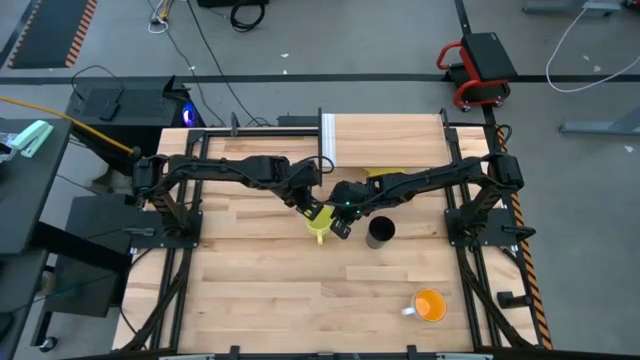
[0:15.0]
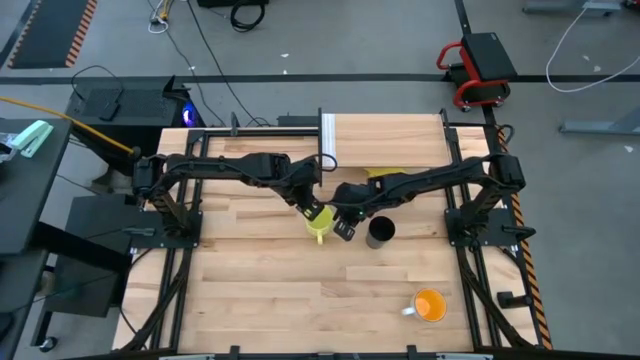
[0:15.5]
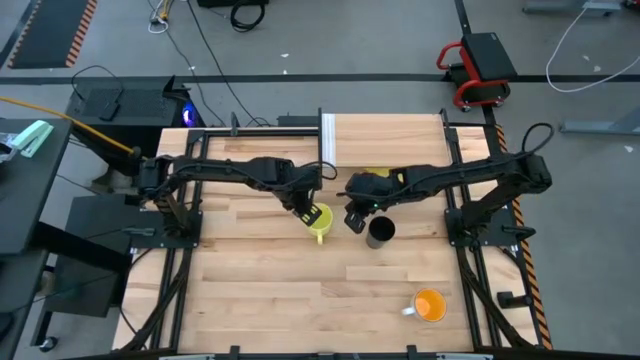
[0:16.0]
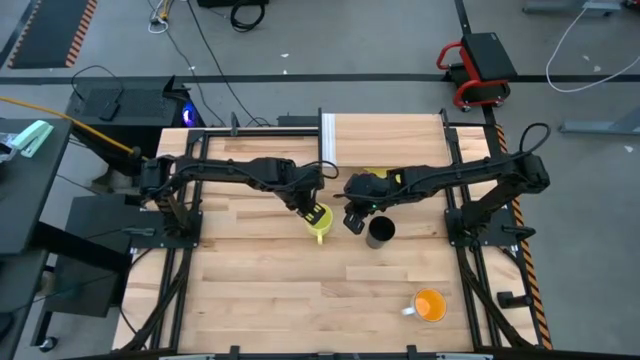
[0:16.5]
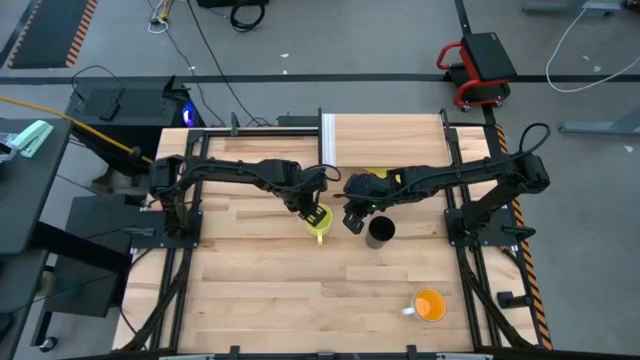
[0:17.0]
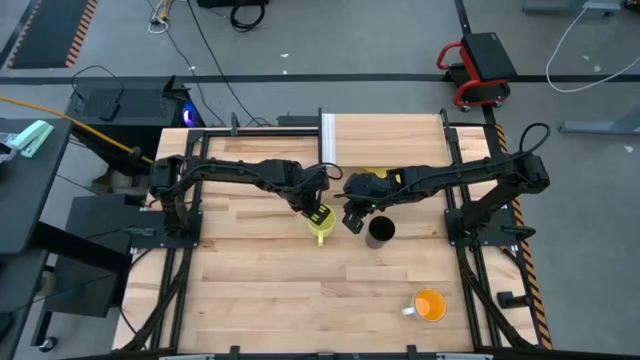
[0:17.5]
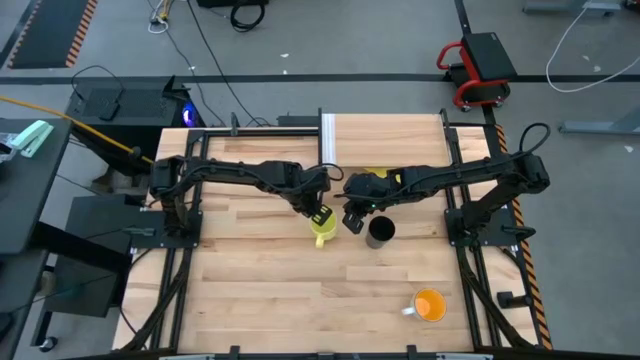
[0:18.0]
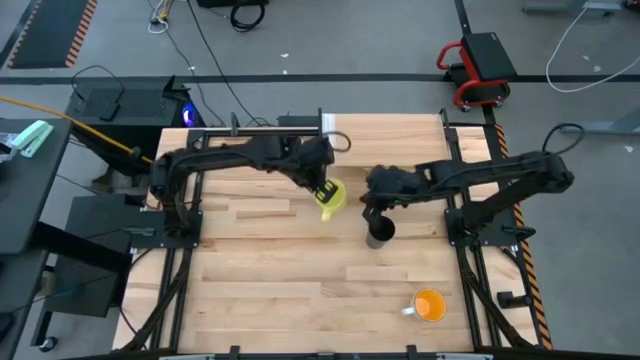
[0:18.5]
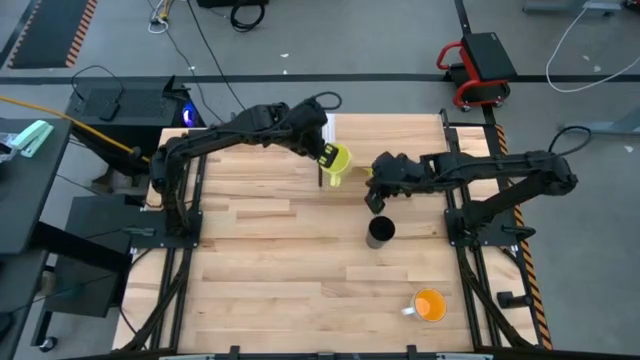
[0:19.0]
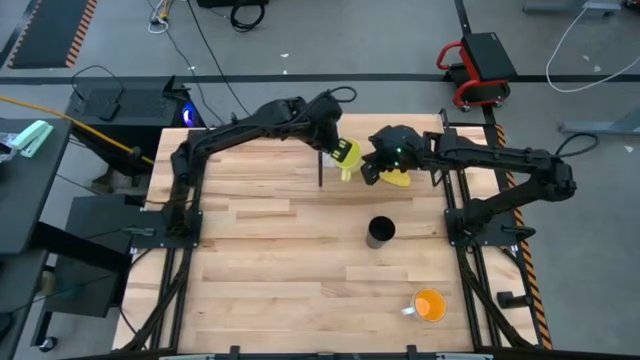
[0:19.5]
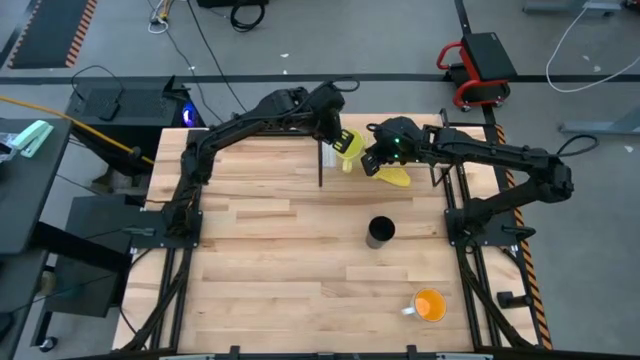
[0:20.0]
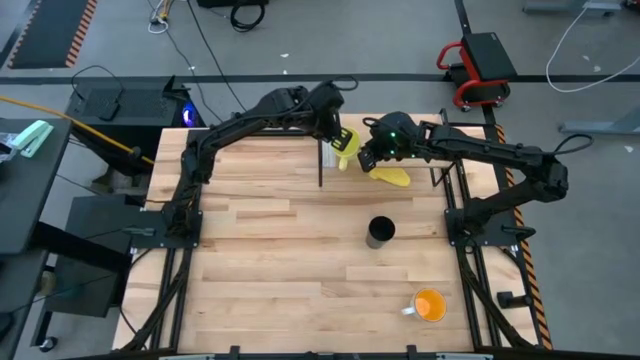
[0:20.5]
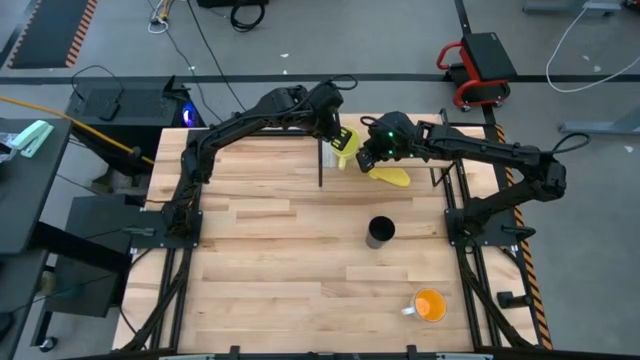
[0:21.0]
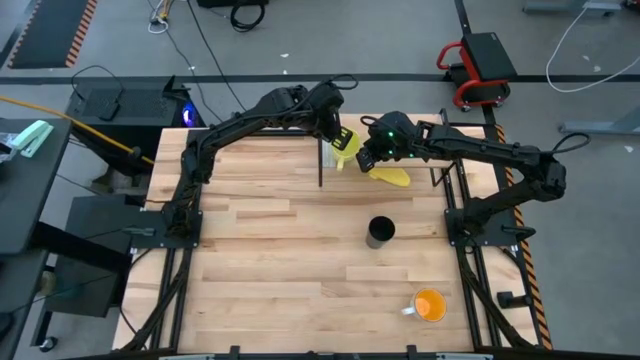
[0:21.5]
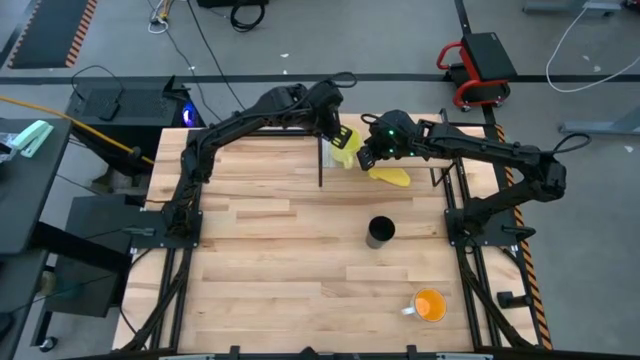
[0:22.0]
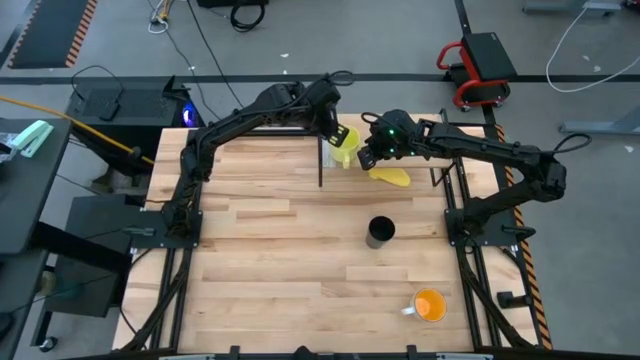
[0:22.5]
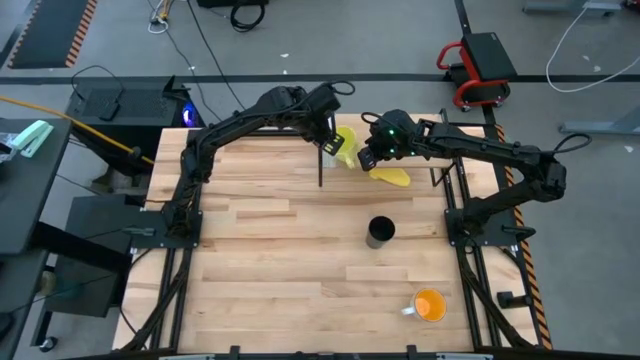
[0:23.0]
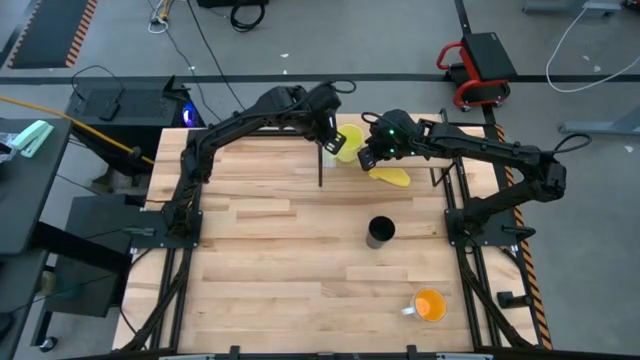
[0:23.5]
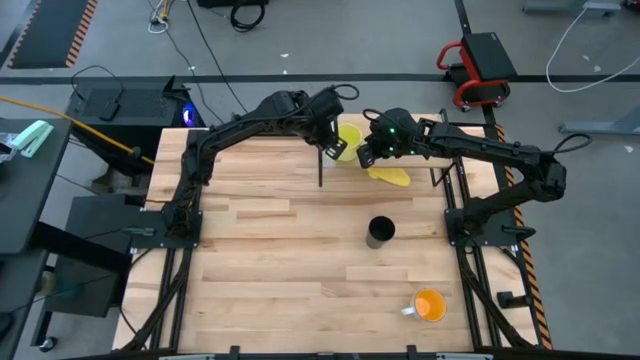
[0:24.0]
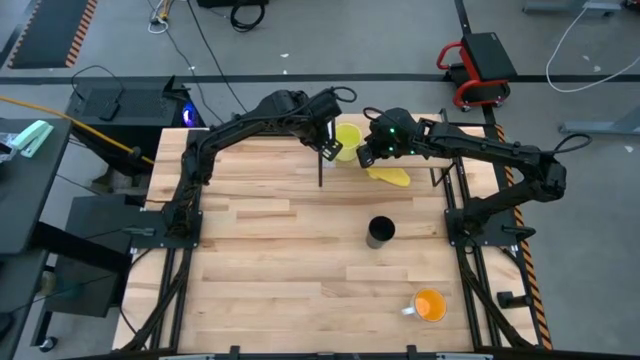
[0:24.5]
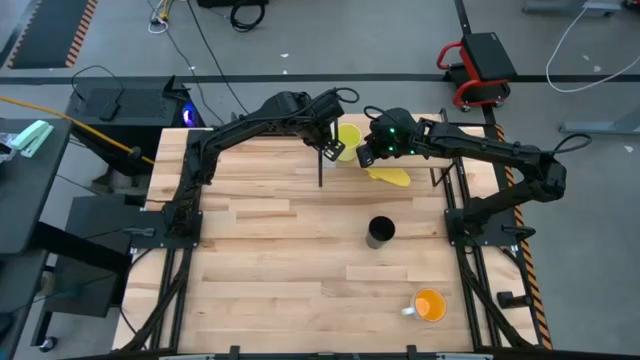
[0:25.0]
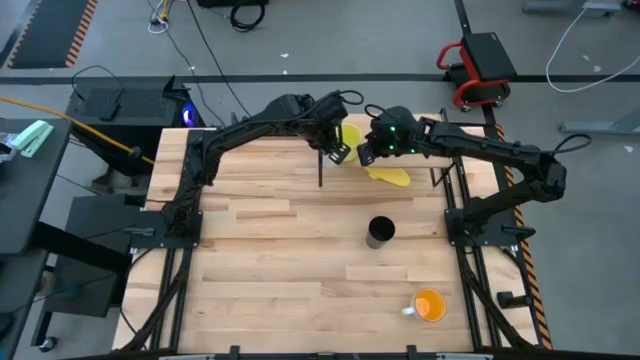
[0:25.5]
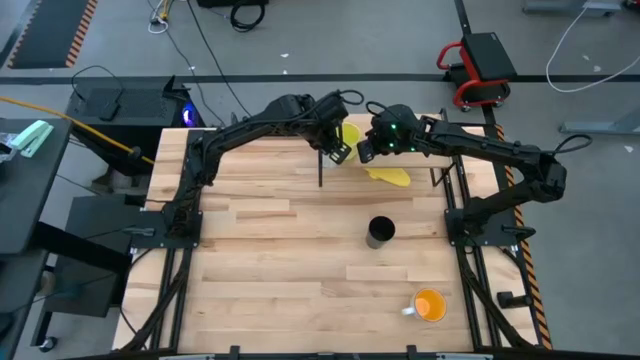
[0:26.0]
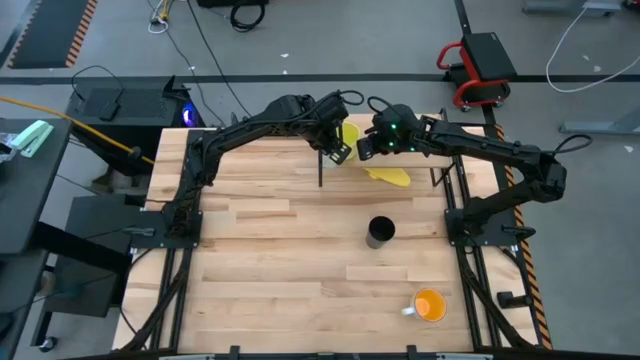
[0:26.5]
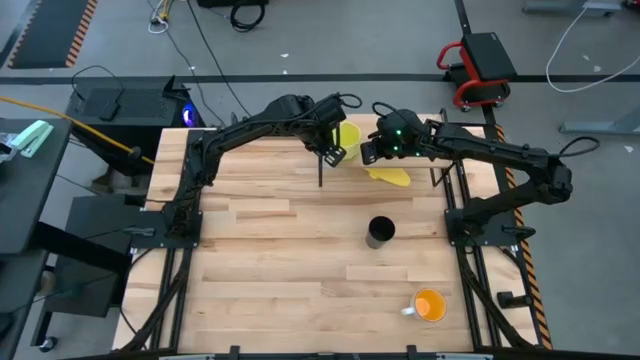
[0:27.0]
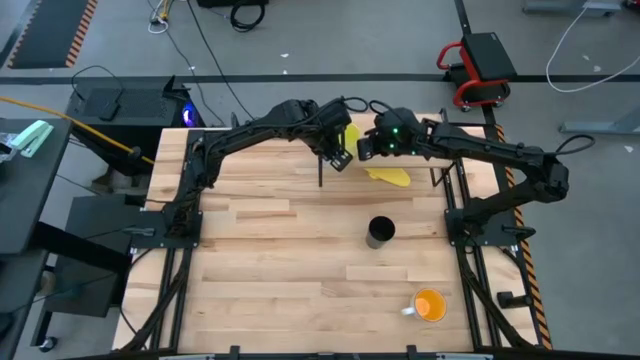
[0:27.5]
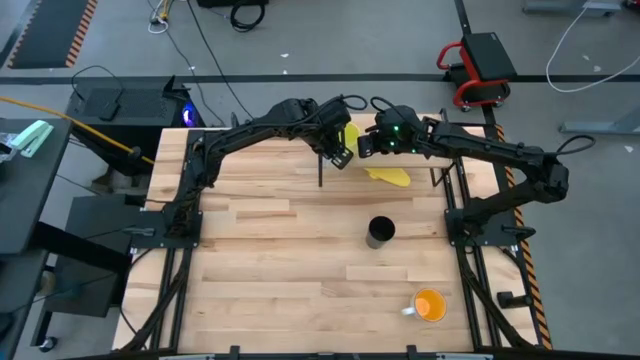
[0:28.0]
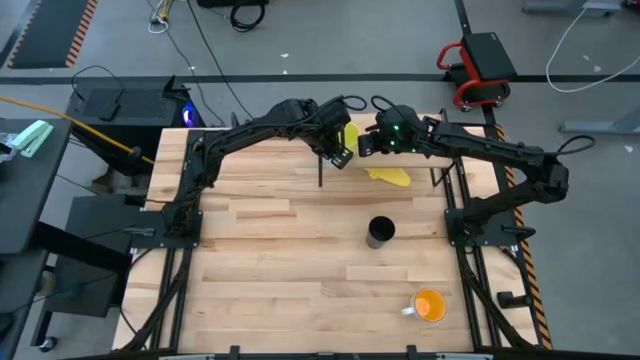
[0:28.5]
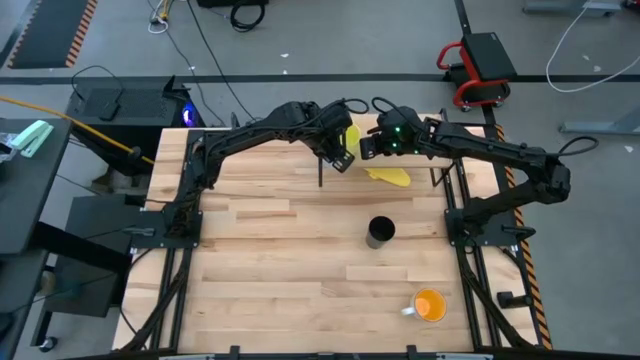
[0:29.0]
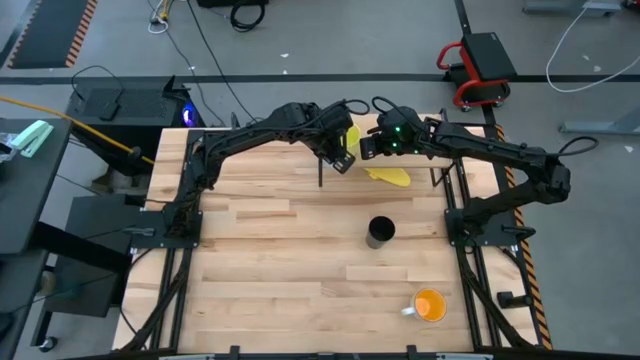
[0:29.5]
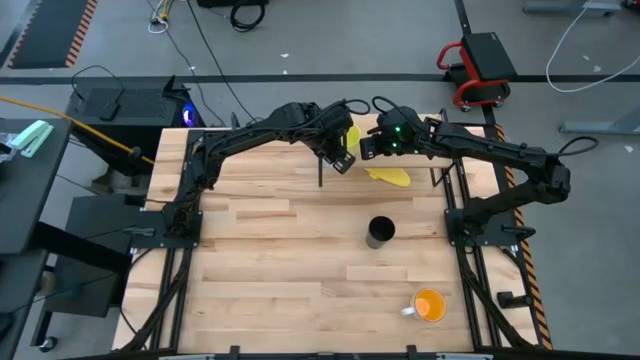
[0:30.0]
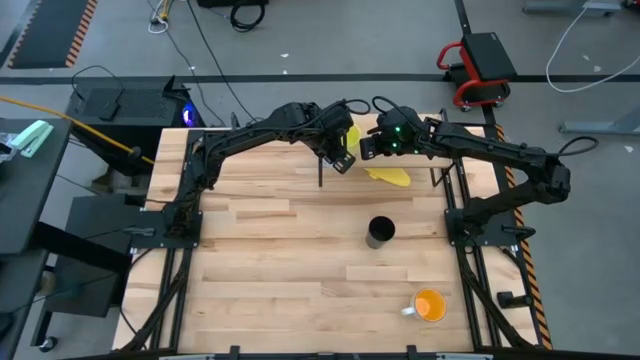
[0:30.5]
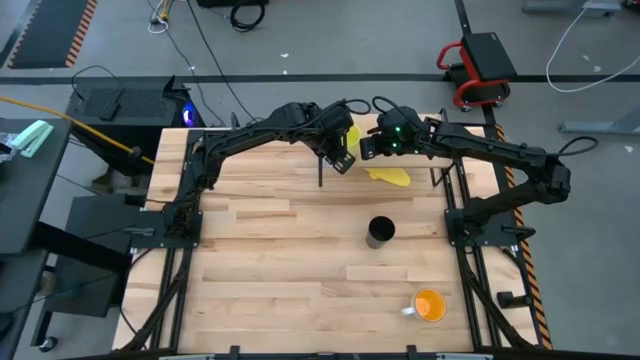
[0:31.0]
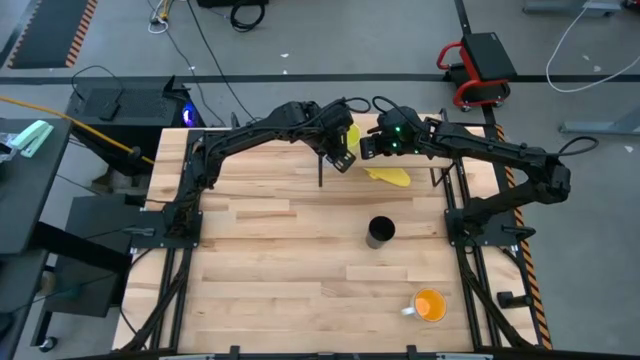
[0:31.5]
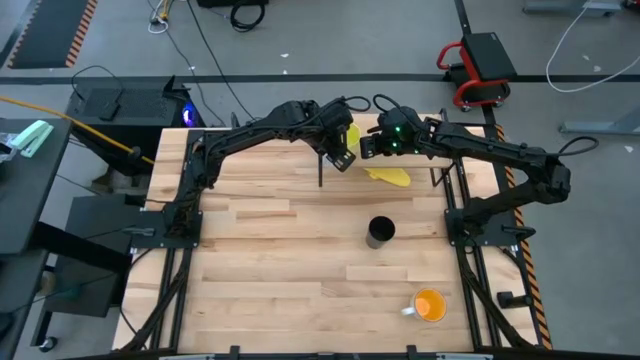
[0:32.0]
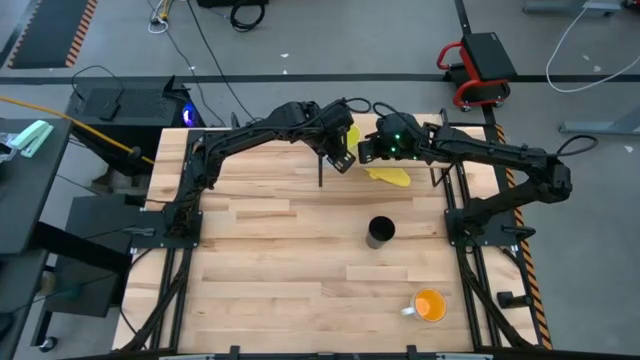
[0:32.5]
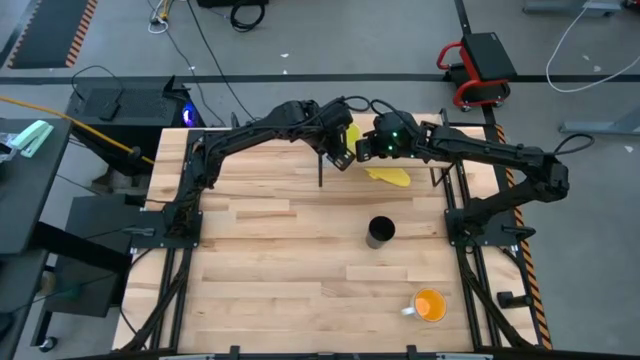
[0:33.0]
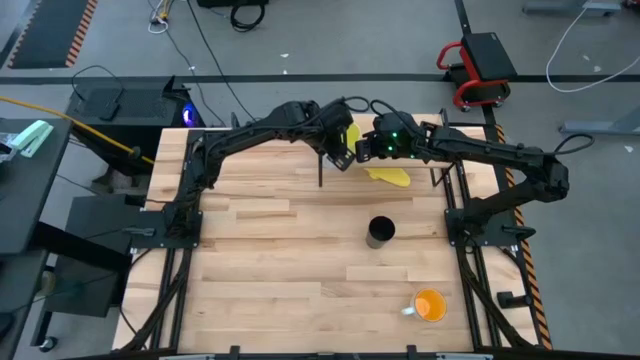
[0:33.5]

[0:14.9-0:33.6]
Task: Stack small to large cups/mugs on shelf
Put the yellow mug on the shelf

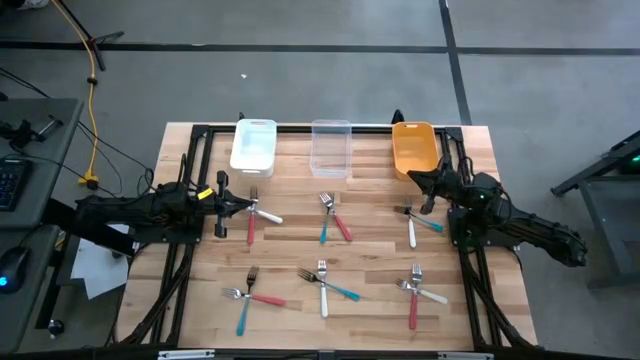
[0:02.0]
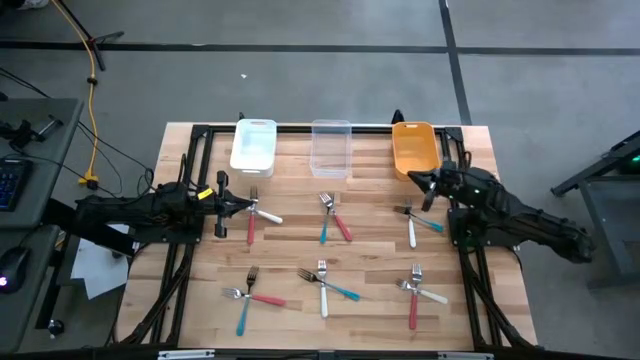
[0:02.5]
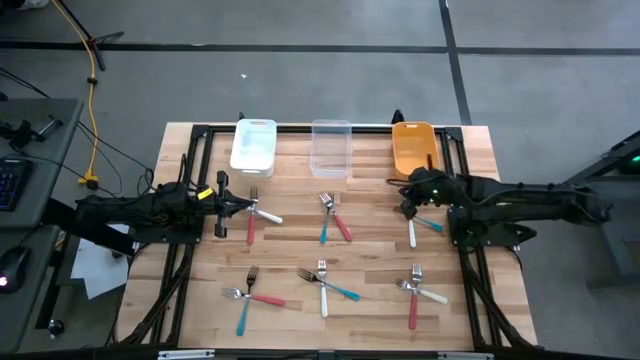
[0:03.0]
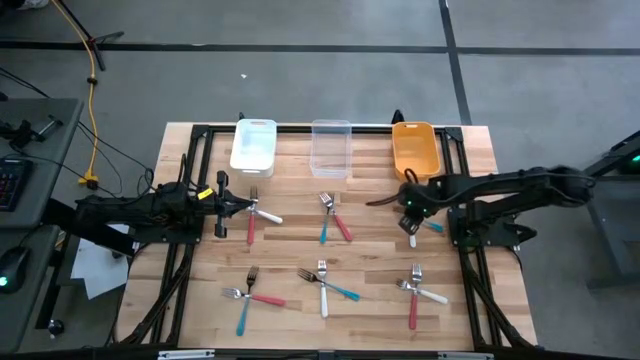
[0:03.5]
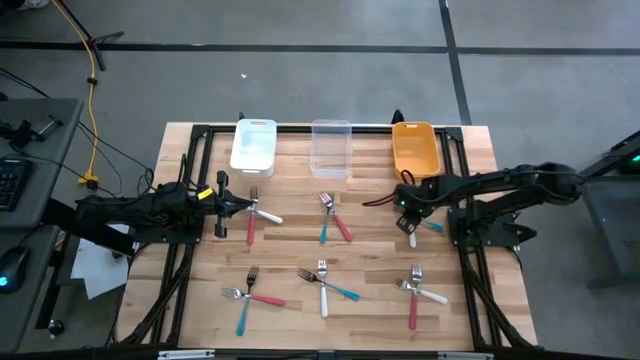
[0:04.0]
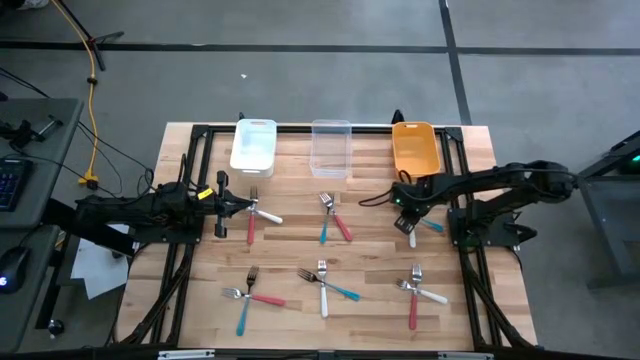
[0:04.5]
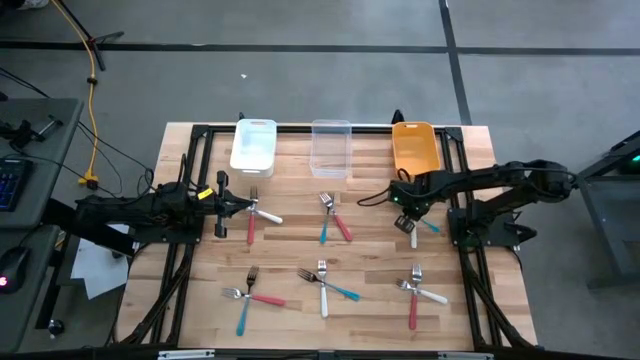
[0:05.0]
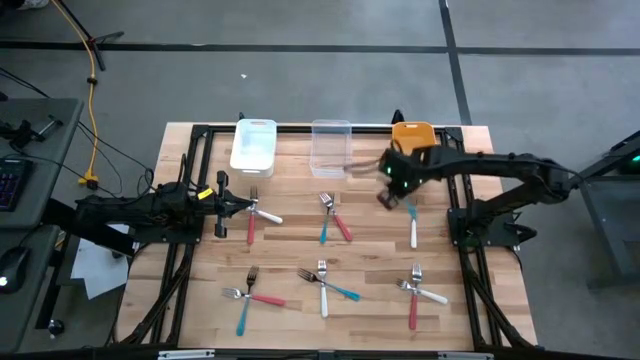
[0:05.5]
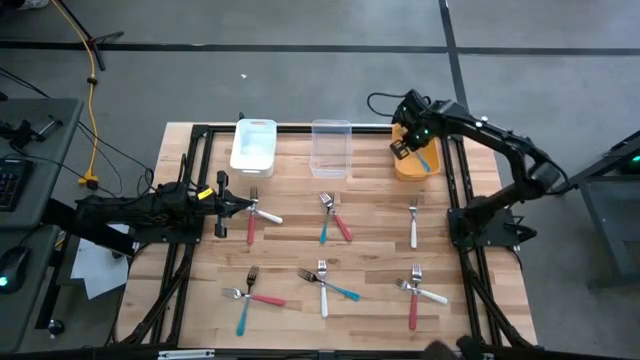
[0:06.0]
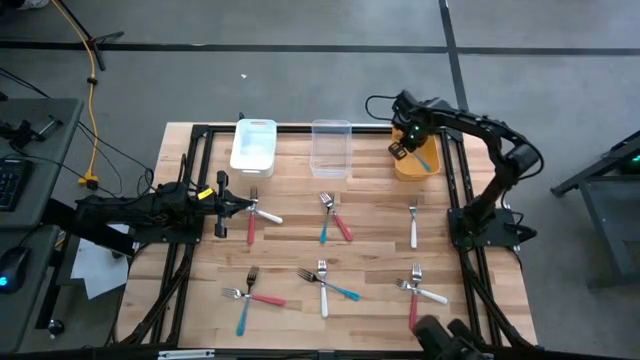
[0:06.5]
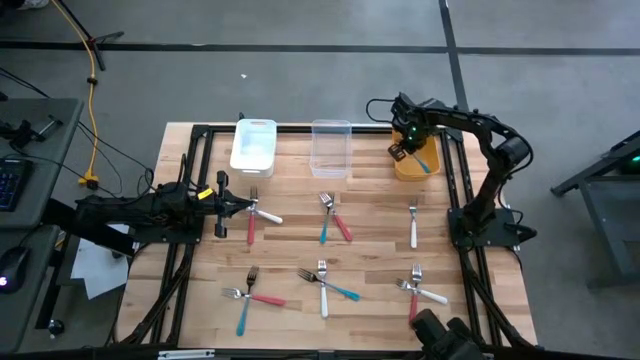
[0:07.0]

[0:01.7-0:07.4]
Task: Sort silverware by color (type)
Put the top right blue fork into the yellow bin
